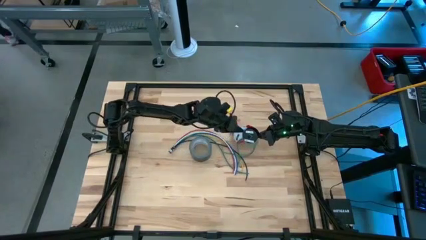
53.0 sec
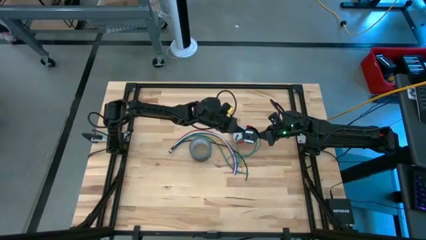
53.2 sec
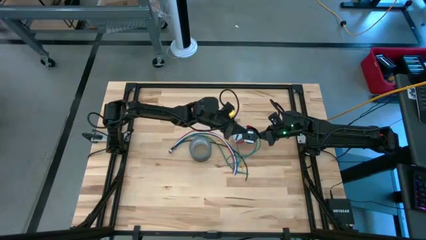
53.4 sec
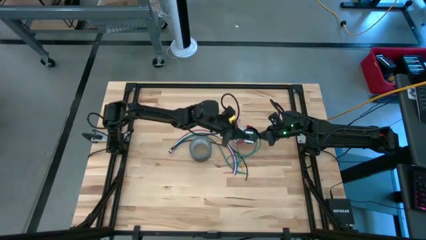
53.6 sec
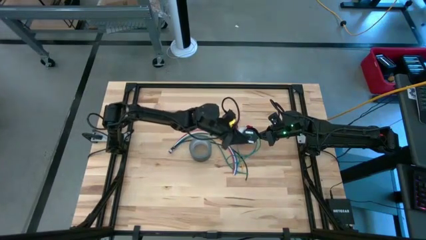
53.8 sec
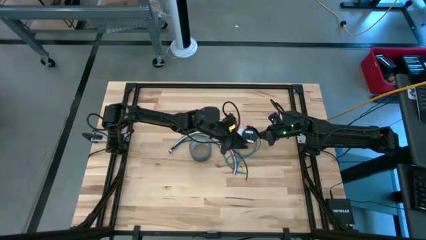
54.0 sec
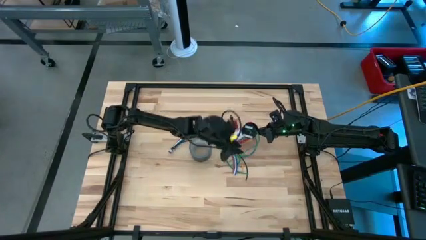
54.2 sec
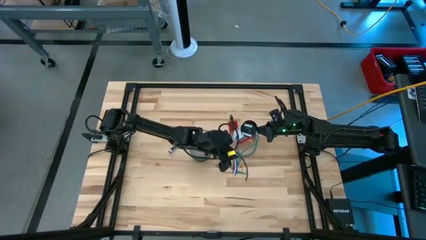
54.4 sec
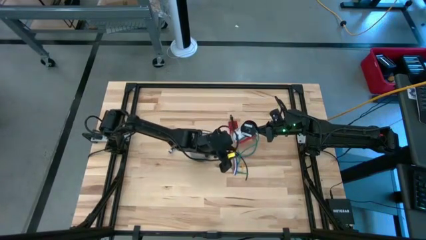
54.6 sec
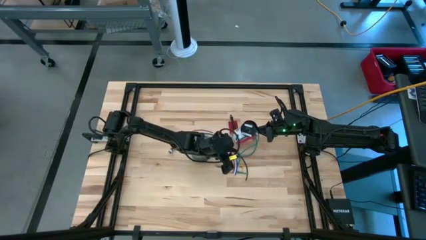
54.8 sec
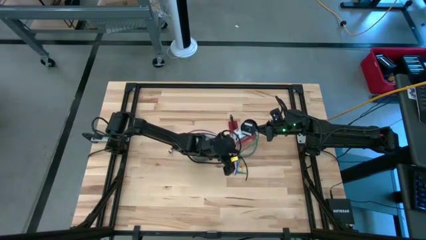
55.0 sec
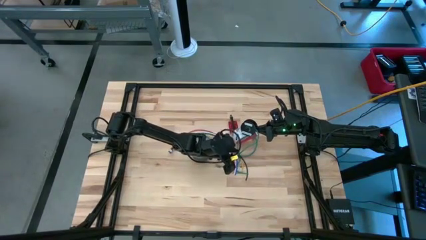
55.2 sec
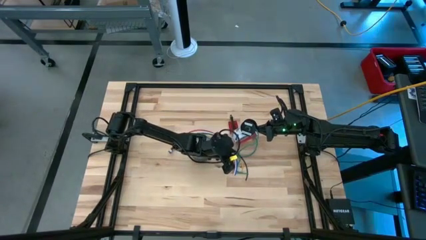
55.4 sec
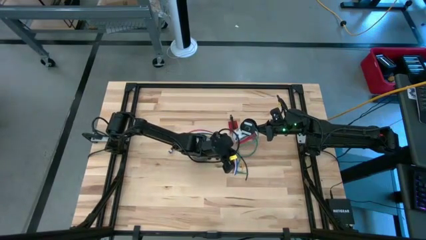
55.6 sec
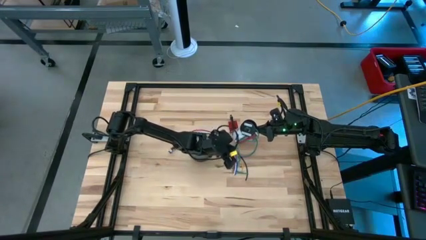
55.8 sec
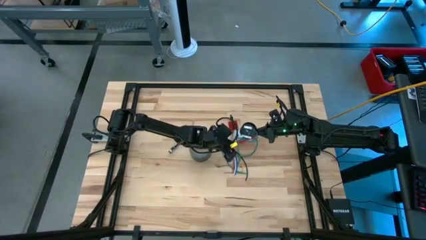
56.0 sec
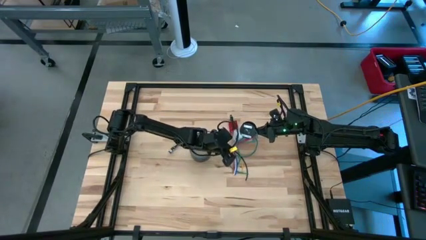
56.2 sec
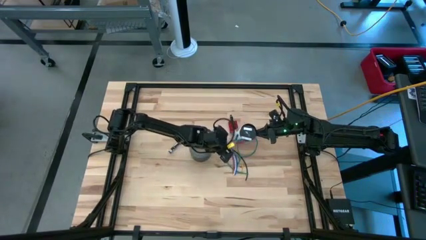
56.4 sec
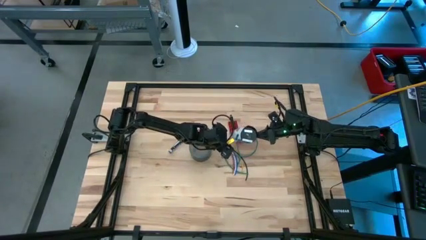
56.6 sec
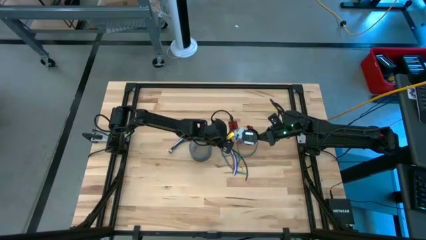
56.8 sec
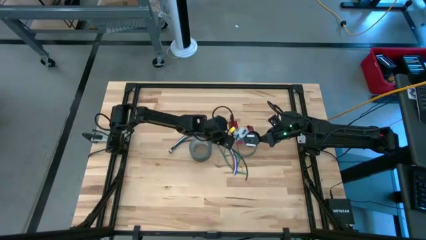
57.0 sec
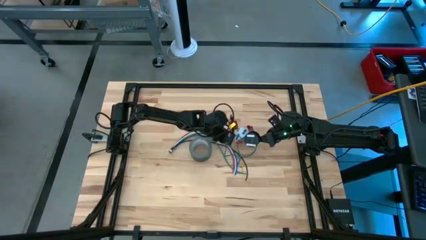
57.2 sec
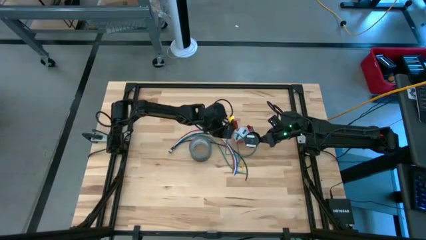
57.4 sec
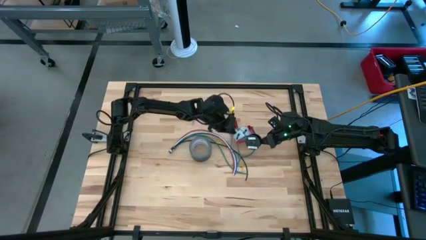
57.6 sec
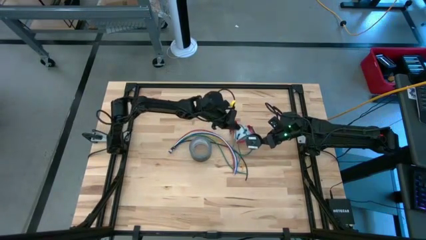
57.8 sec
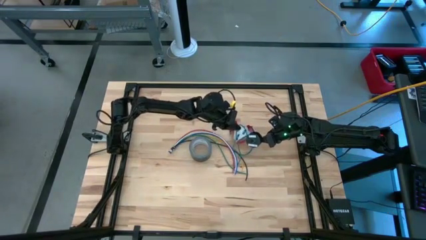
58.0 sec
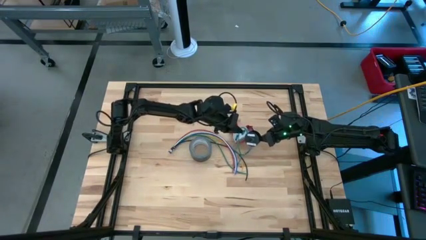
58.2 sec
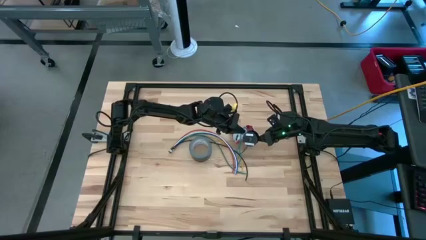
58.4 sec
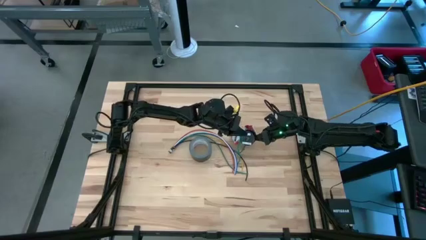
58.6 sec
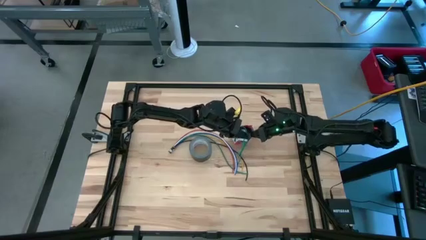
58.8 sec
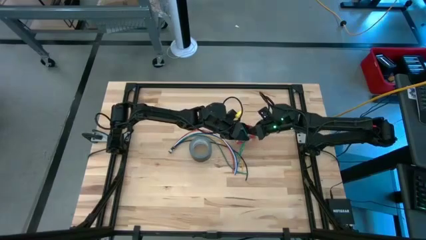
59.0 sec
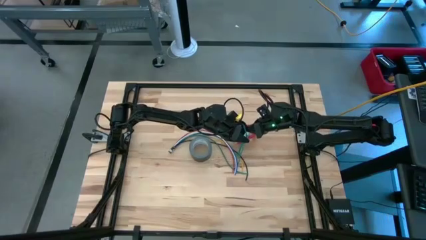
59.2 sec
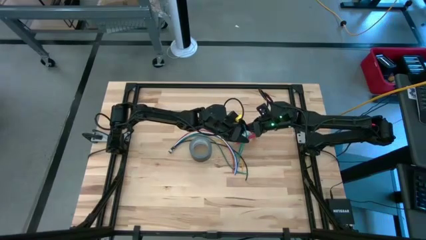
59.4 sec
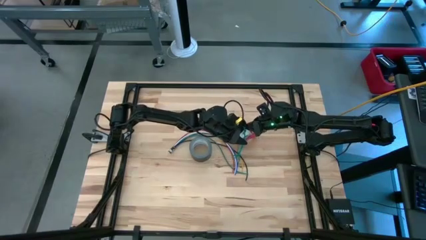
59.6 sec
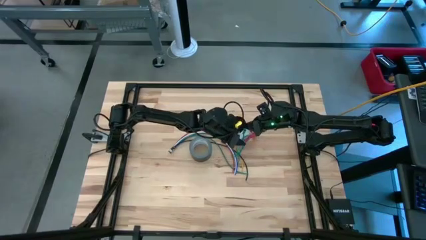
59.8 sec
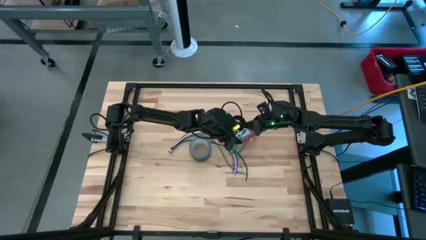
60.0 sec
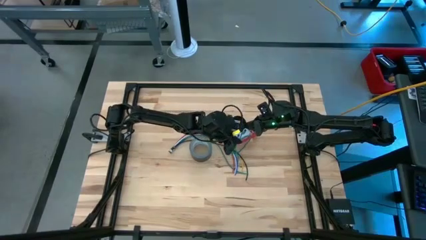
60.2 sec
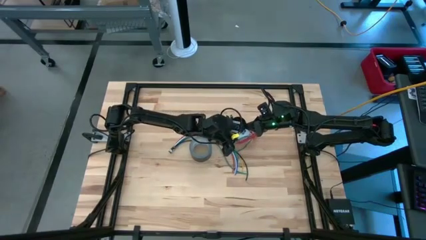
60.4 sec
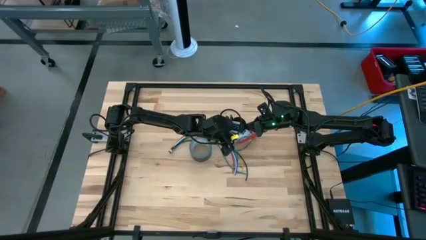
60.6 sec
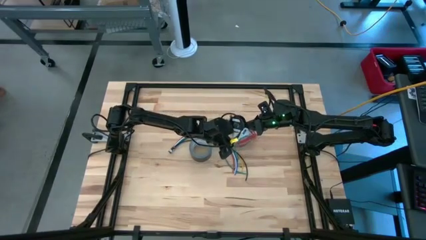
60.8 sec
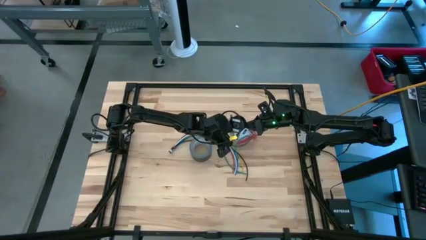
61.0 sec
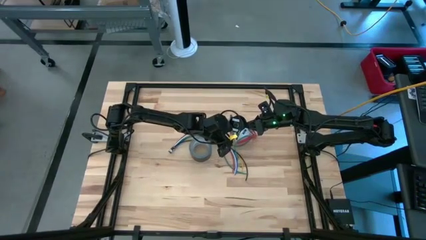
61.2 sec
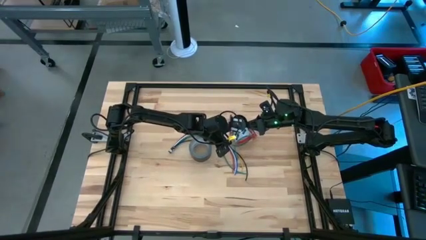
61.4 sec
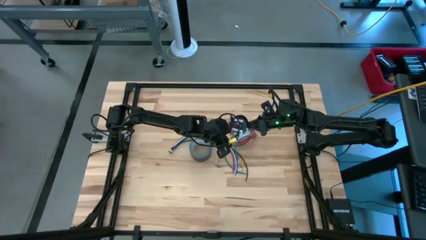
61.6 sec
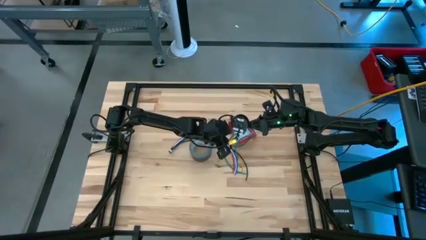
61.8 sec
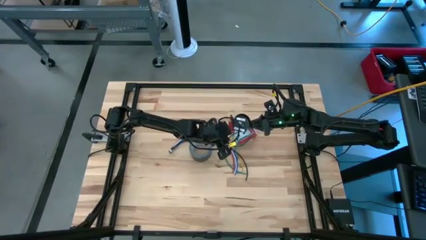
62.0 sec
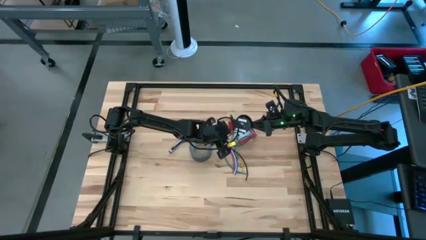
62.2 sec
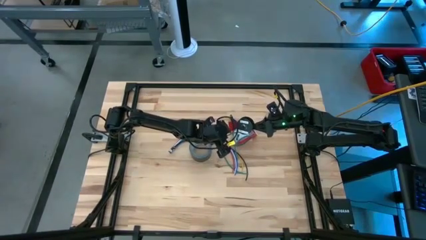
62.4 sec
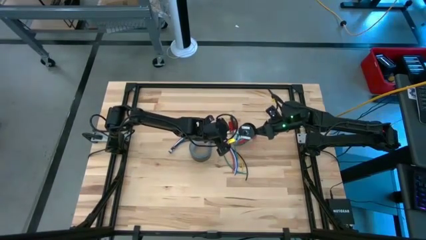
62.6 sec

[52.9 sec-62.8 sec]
Task: Coil cords
Coil the green wire into the spool

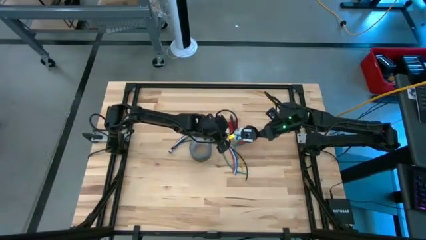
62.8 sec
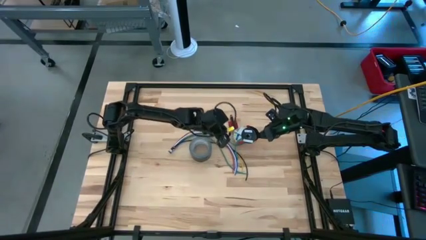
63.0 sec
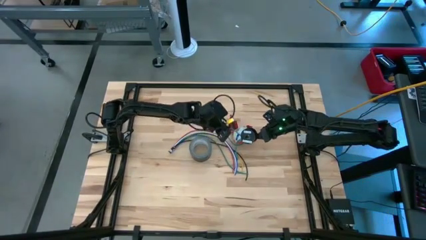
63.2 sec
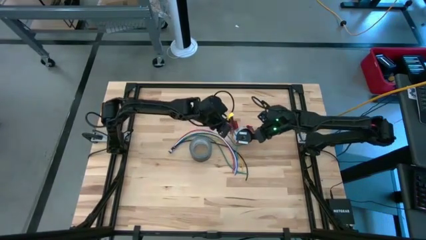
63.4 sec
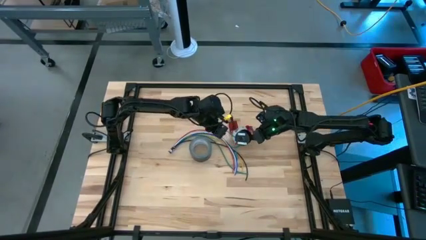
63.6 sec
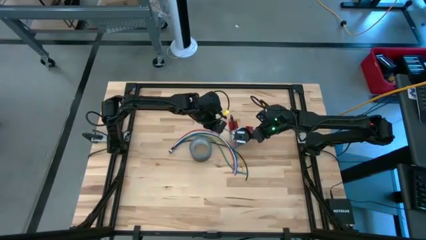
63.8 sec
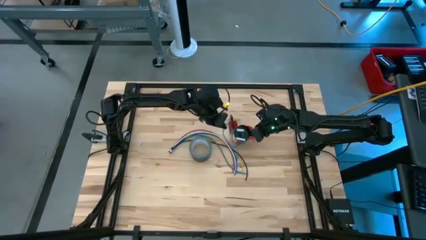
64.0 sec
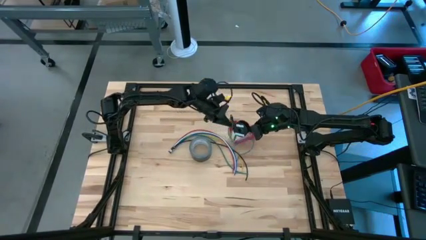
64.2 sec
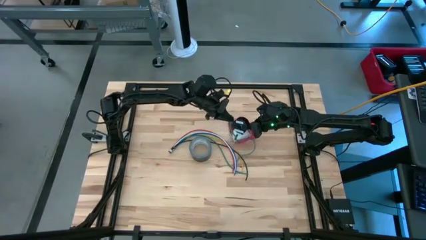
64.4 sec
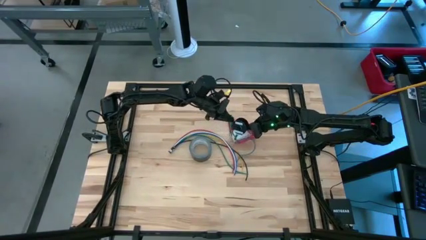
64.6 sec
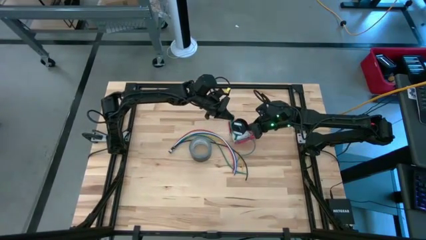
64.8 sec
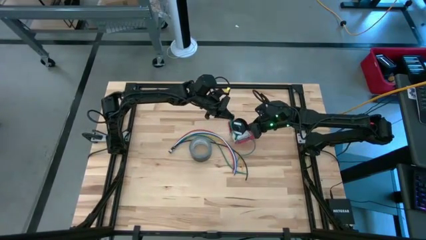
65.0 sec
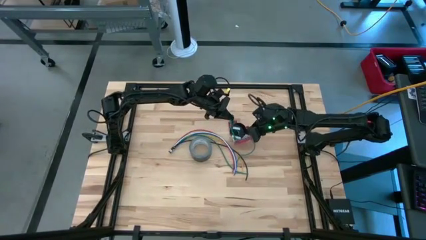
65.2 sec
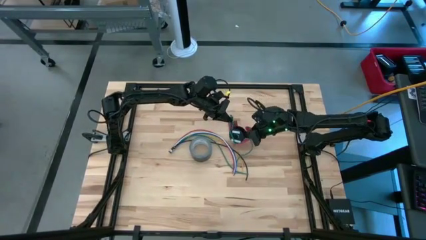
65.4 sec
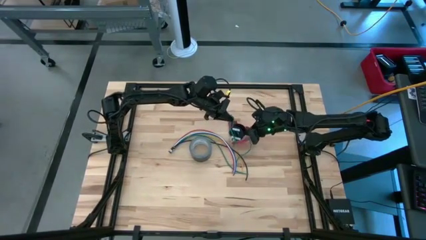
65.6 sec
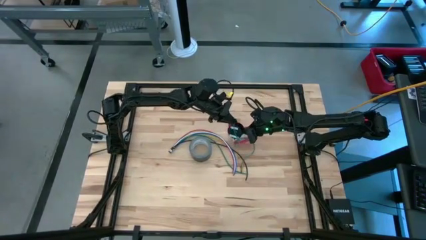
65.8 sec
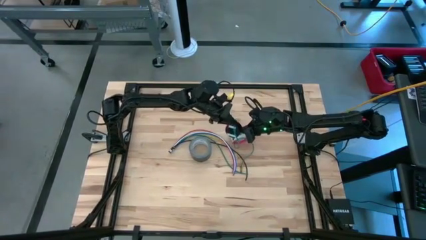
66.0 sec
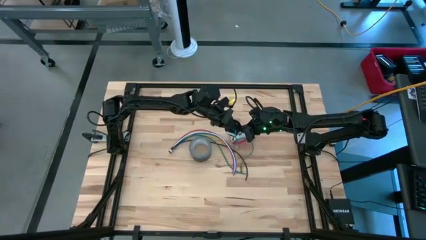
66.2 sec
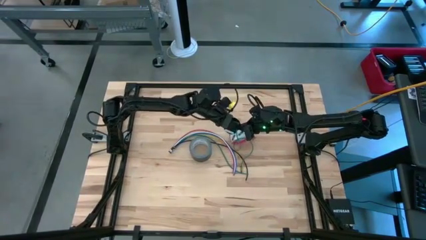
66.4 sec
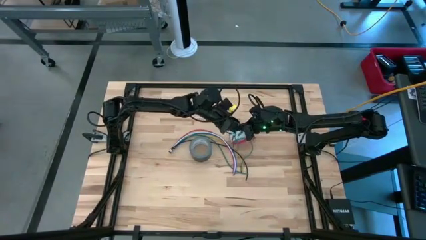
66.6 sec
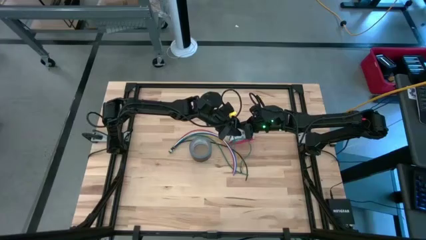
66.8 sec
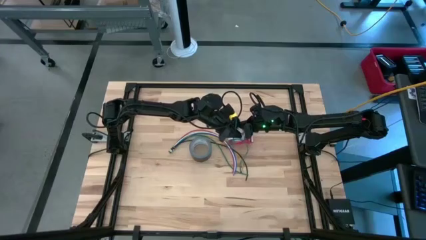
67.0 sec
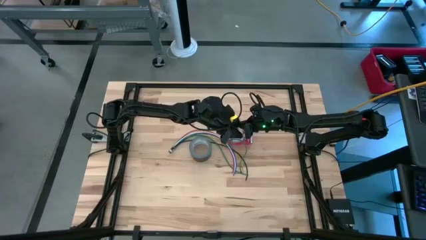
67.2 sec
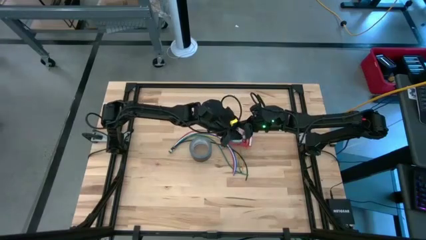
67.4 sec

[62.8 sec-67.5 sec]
Coil the green wire into the spool

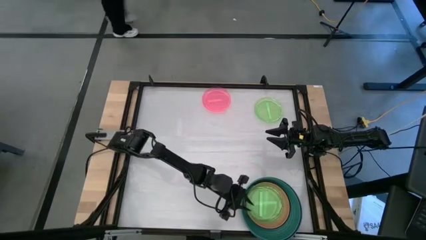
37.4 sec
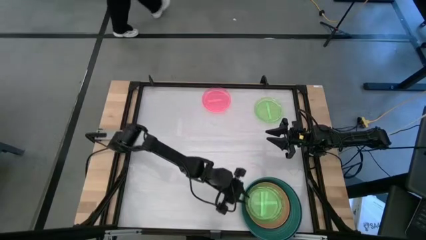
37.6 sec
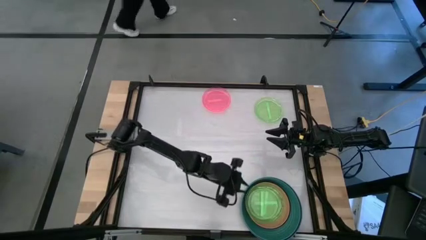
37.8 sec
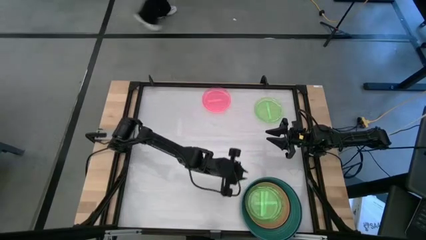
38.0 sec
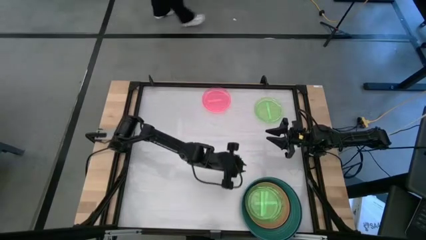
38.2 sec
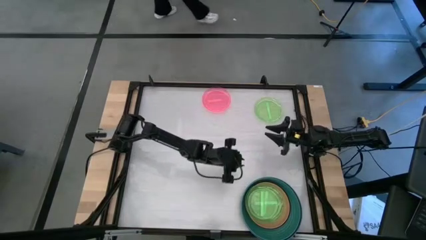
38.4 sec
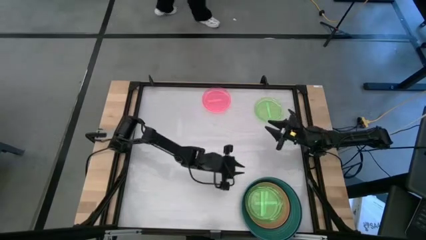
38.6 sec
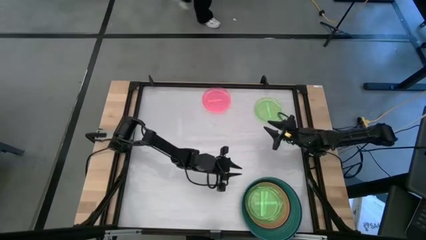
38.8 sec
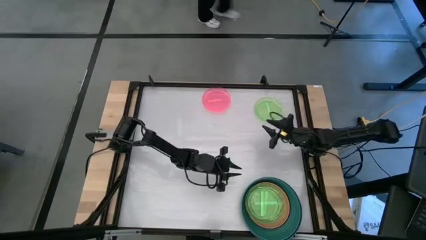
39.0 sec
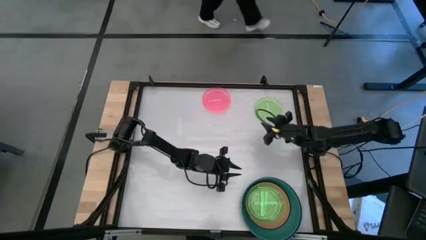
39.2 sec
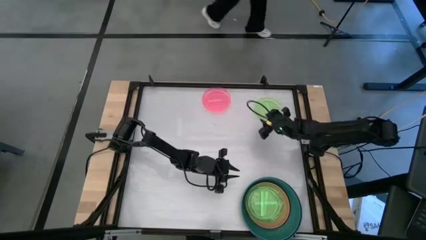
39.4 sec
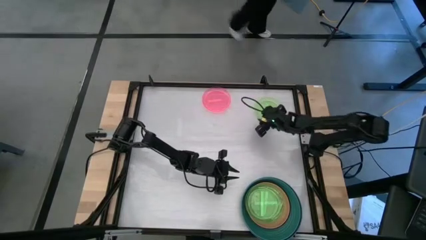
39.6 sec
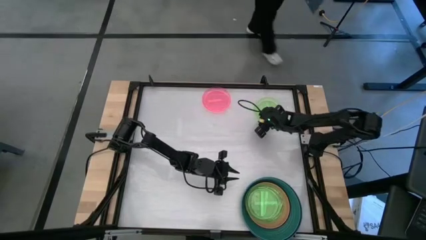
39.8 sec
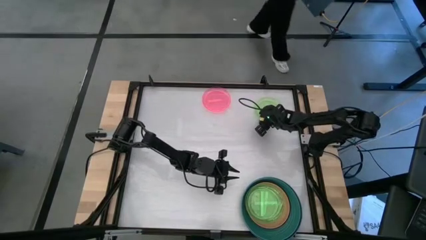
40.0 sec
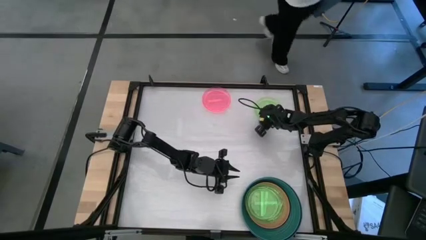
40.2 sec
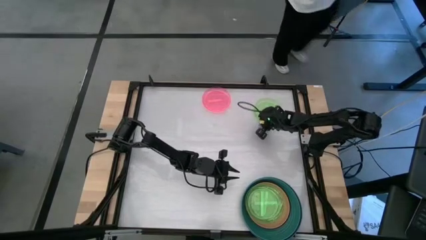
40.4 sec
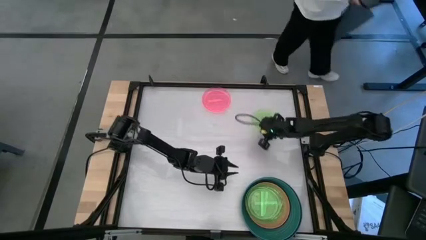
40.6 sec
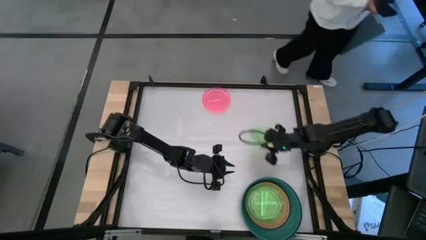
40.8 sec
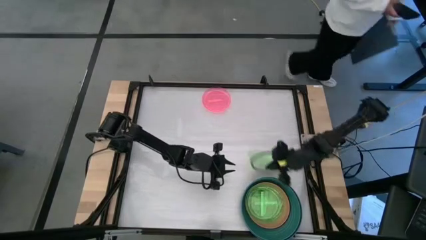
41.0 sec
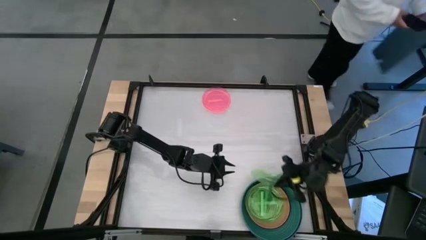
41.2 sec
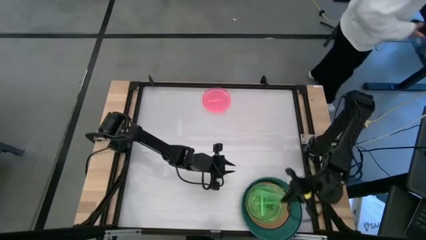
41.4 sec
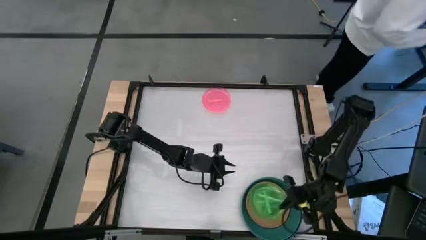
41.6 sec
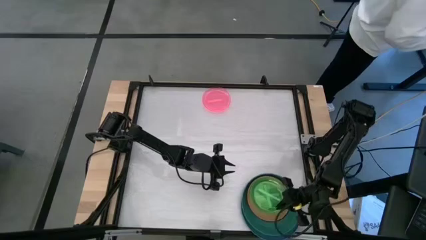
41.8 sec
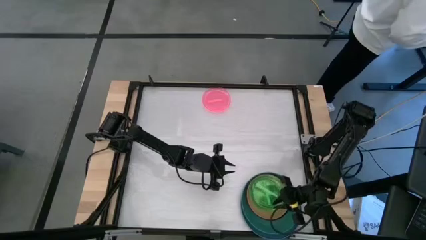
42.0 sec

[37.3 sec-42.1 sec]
Task: Stack plastic plates
Stack the light green plate on top of the light green plate
